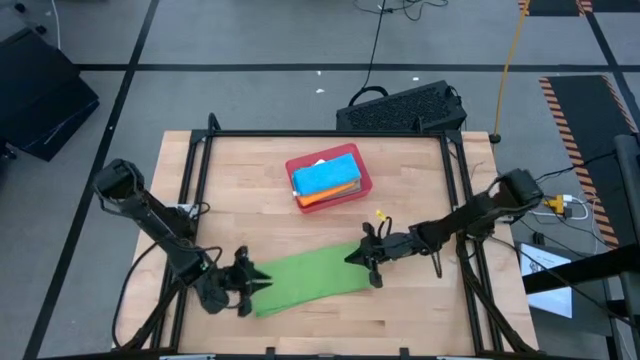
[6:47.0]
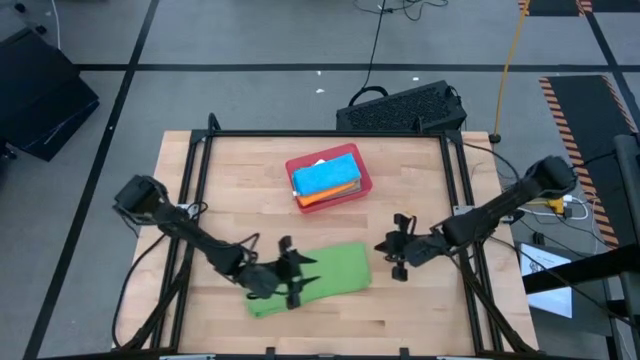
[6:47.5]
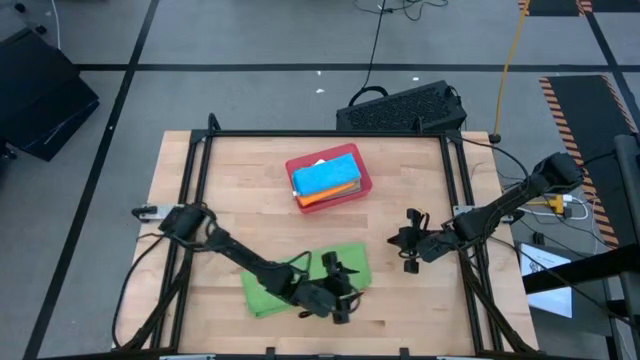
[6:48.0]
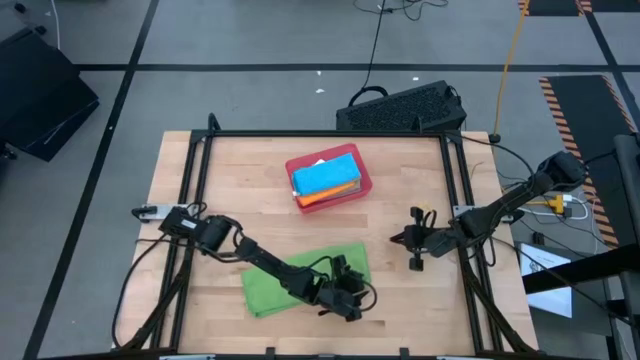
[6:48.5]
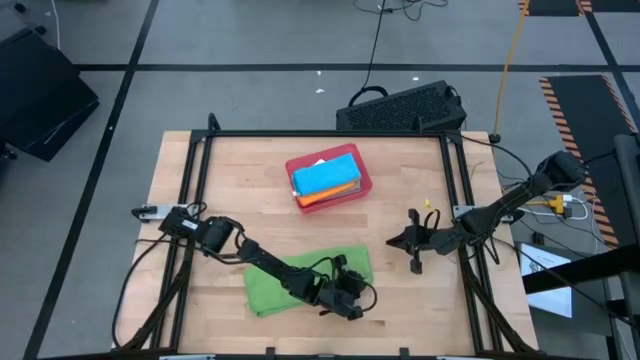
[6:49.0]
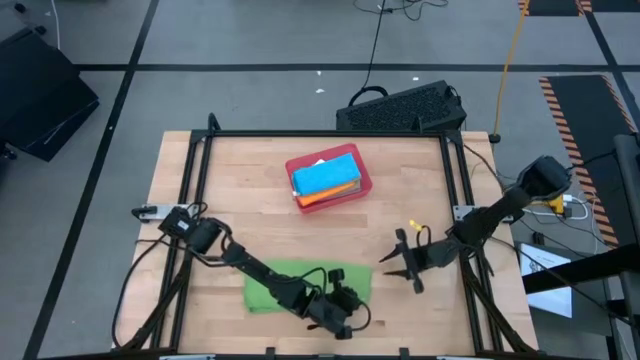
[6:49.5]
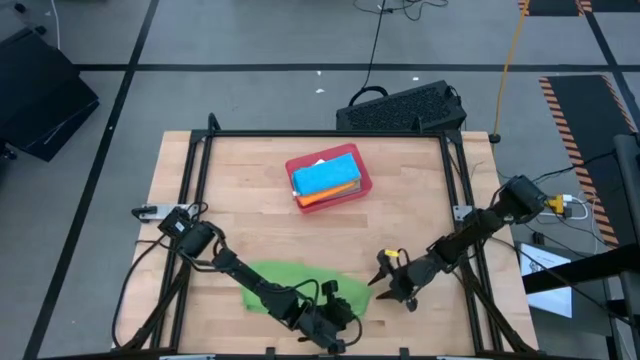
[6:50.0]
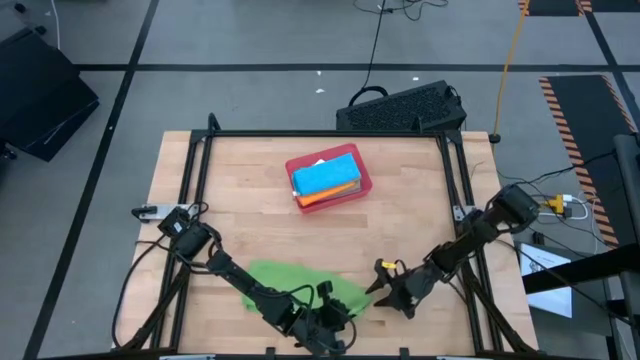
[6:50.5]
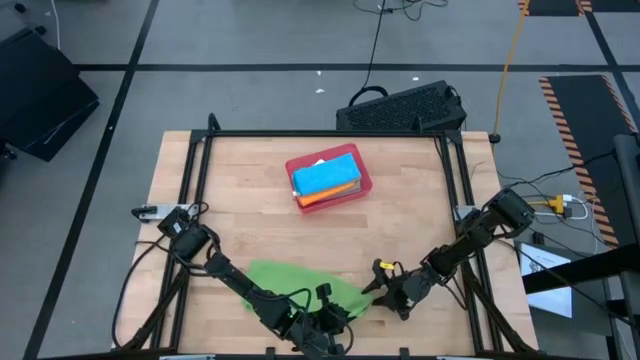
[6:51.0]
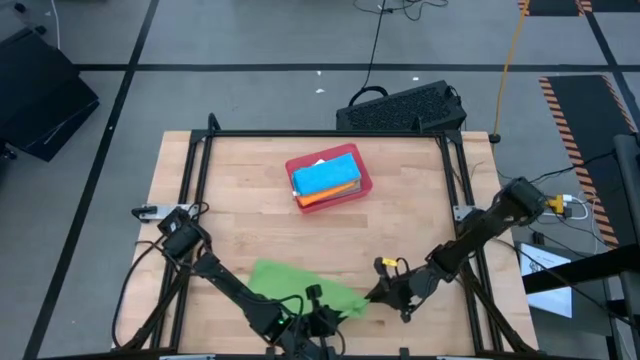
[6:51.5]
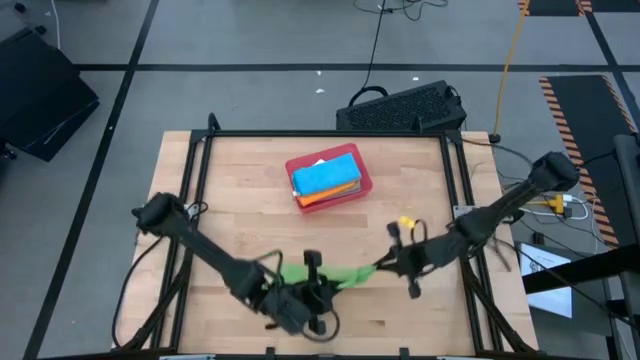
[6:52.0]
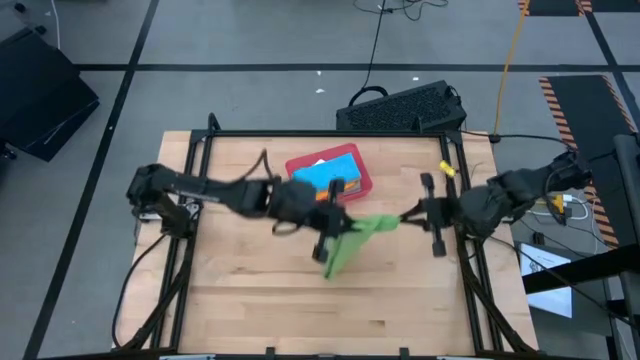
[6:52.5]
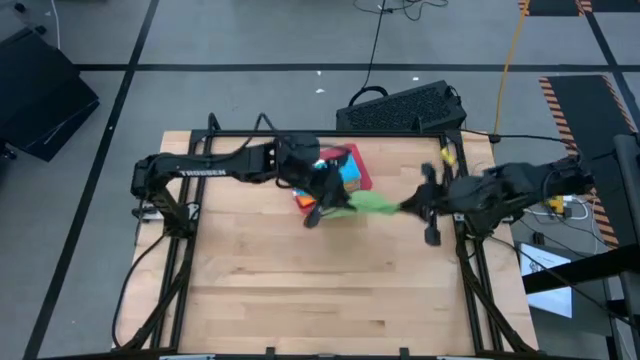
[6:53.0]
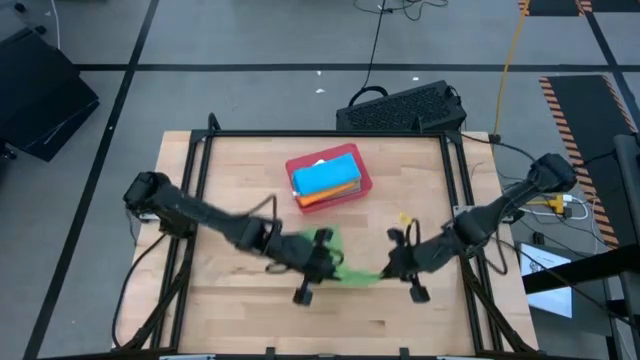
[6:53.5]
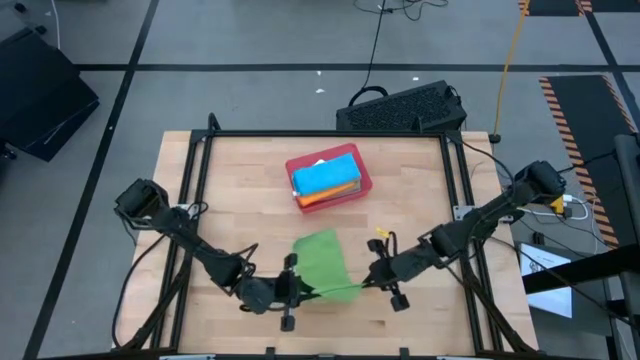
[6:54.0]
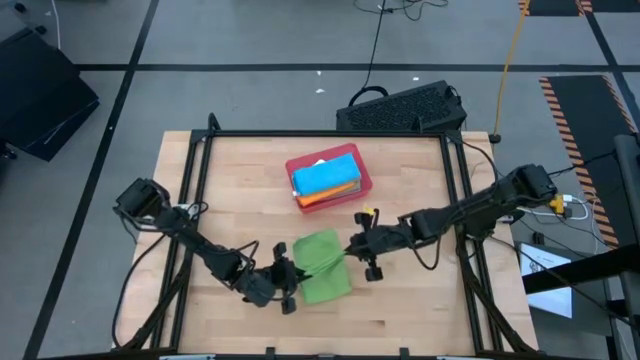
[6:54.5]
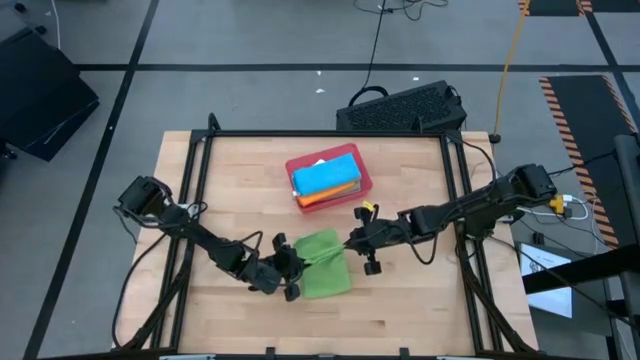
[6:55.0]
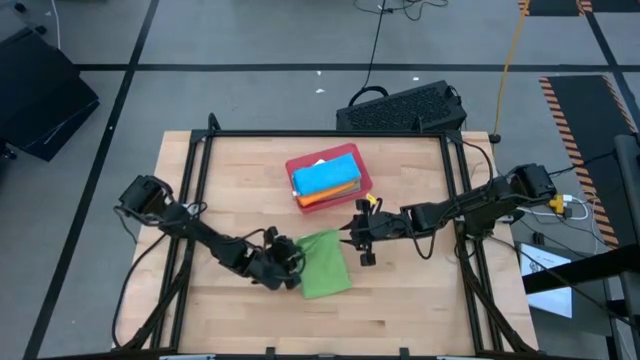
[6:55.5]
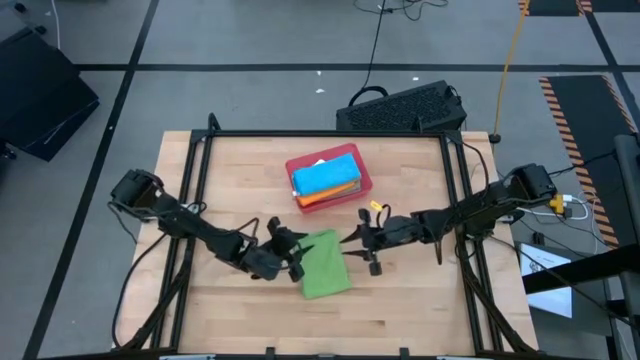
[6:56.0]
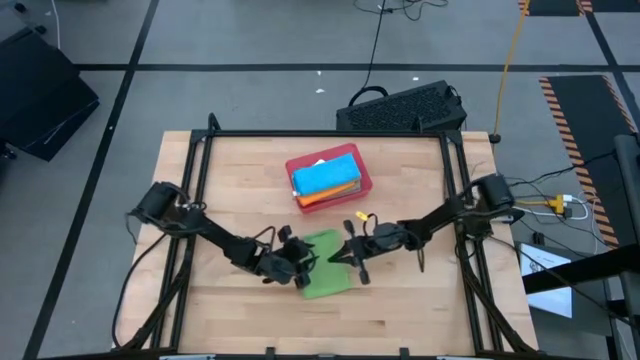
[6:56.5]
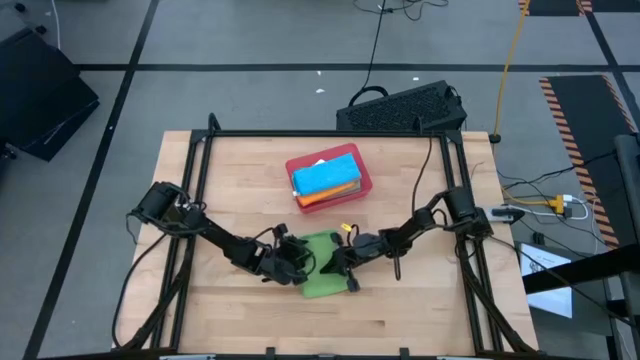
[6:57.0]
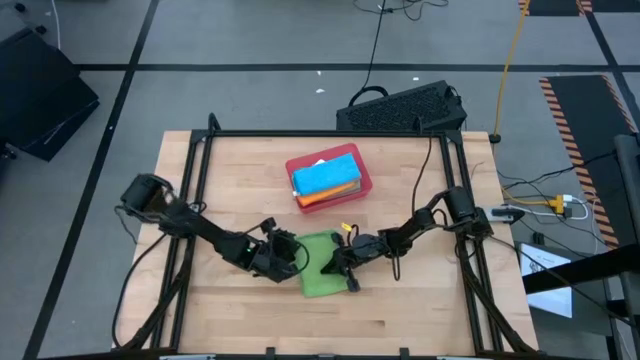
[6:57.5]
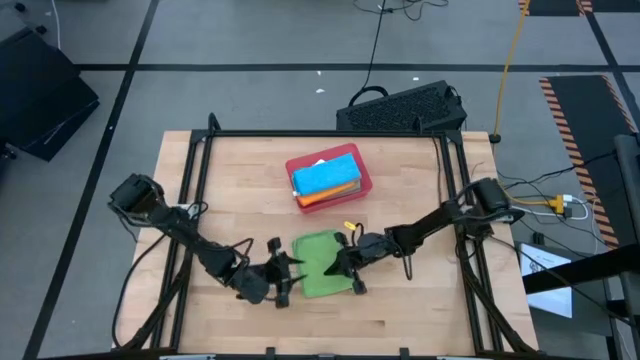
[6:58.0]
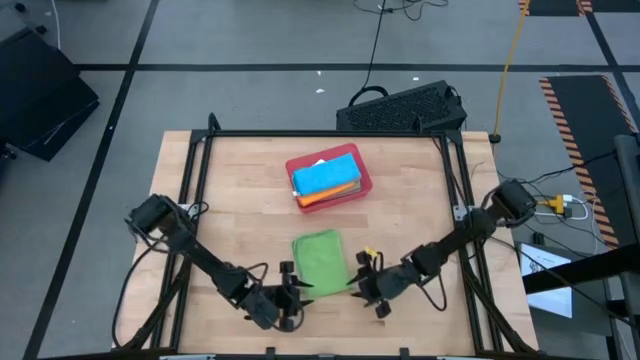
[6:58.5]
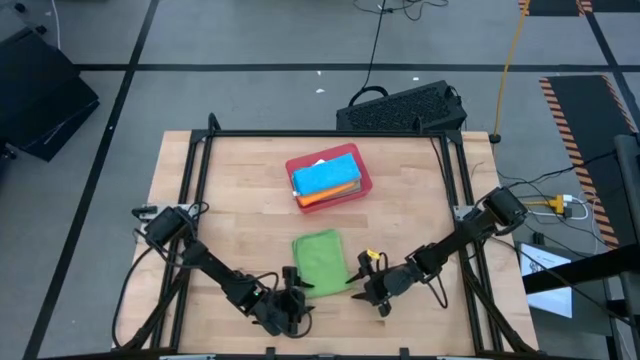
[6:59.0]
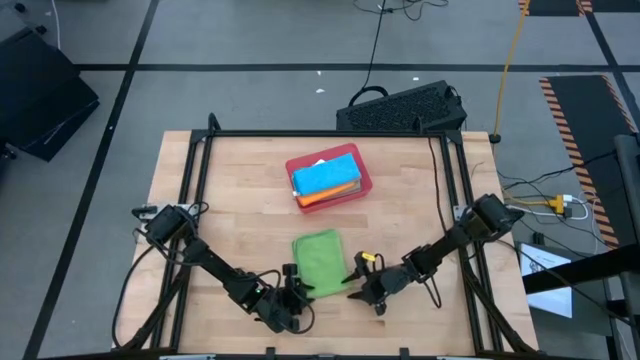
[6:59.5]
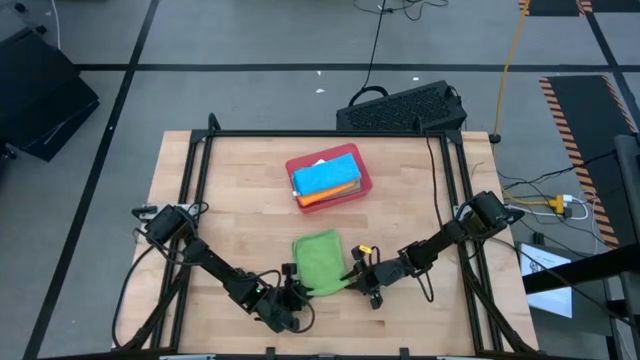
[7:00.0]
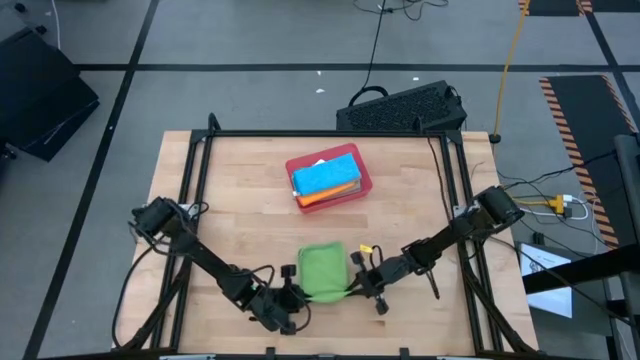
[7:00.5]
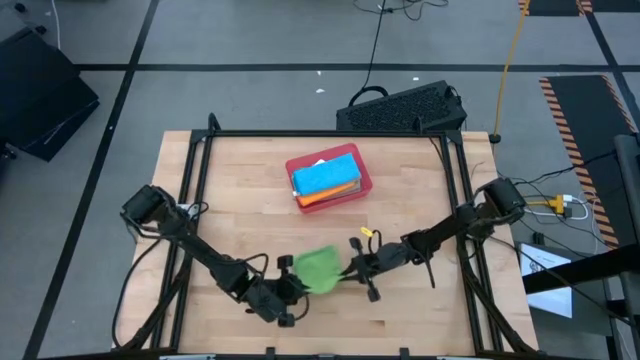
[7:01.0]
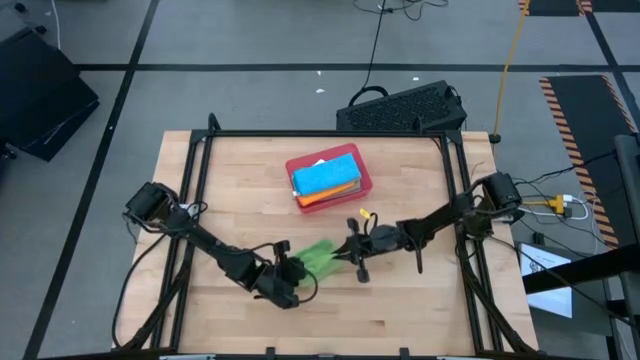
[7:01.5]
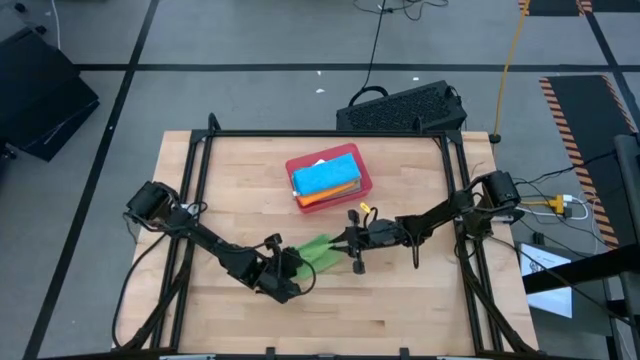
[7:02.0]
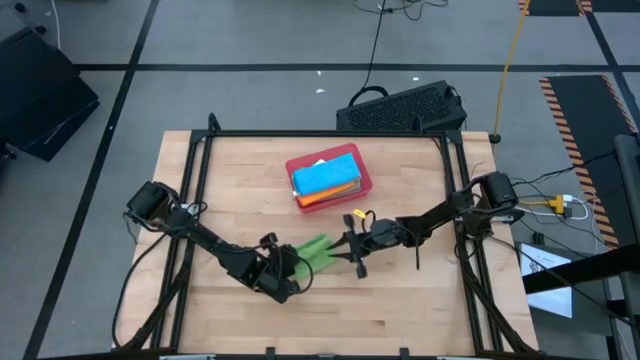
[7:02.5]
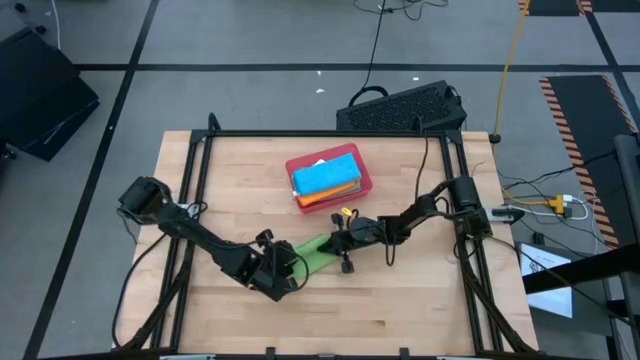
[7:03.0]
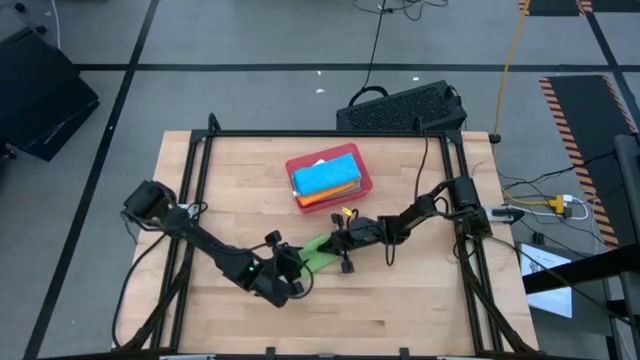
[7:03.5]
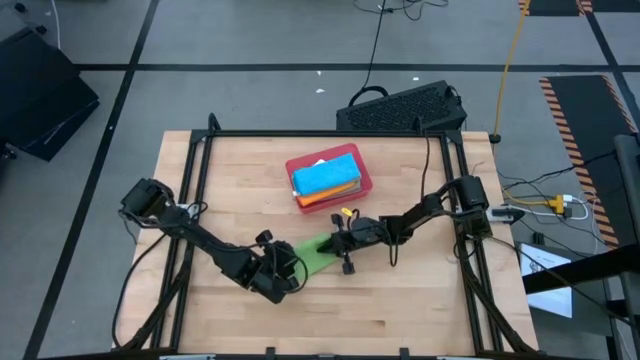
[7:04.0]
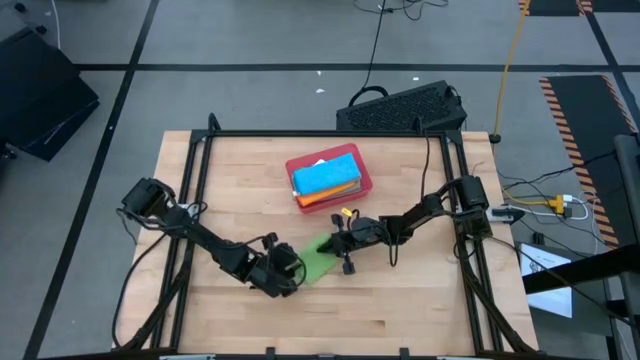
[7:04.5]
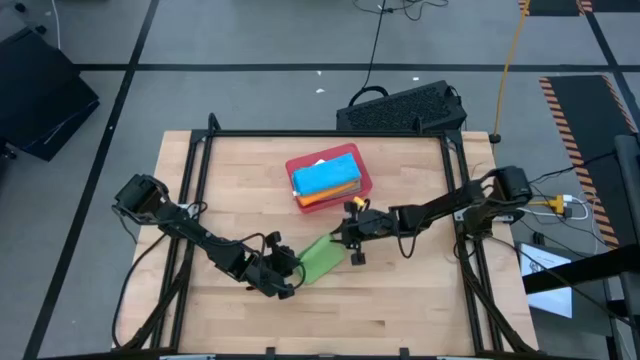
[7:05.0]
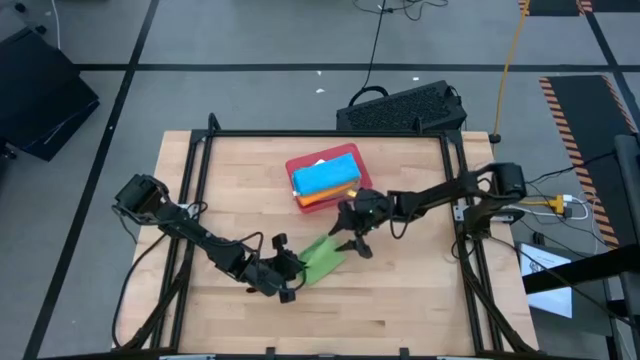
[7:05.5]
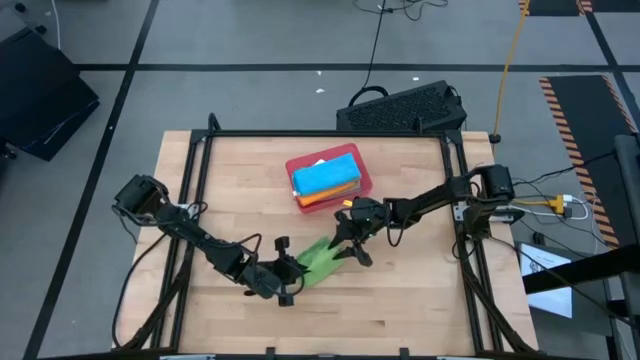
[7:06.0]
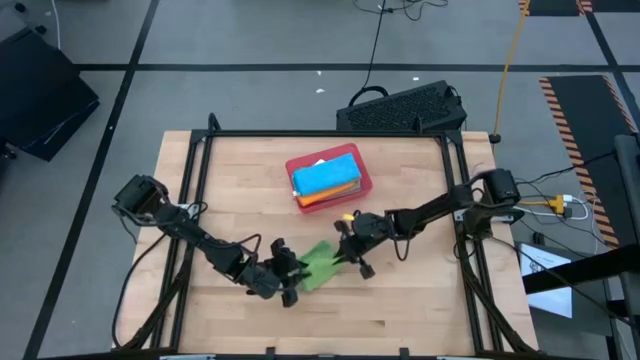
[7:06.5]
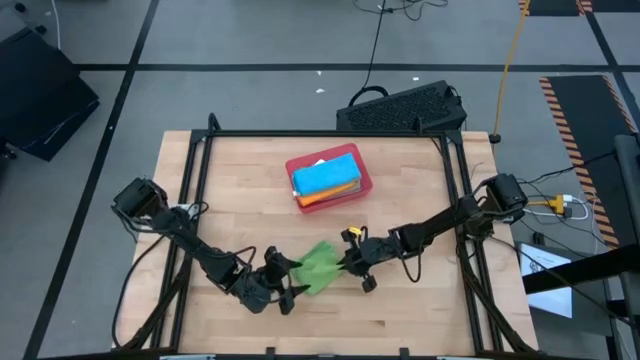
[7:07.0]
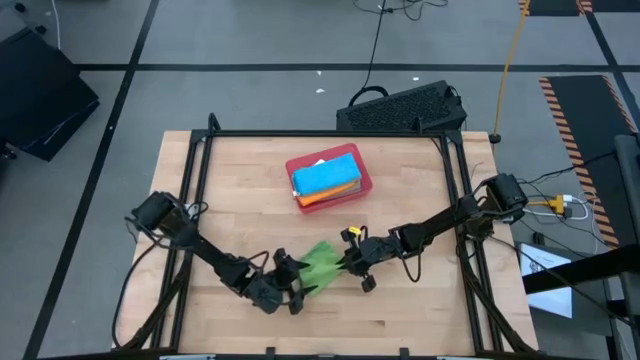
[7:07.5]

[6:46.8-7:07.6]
Task: Fold microfiber towels
Fold the green microfiber cloth
